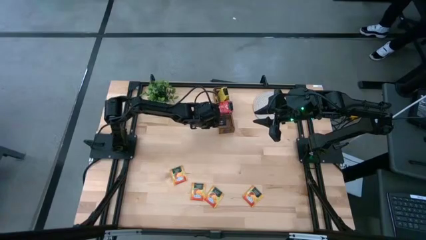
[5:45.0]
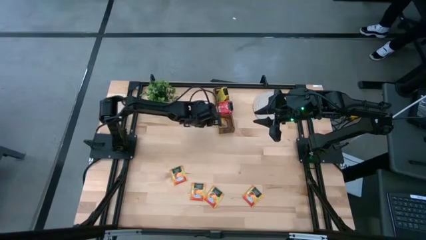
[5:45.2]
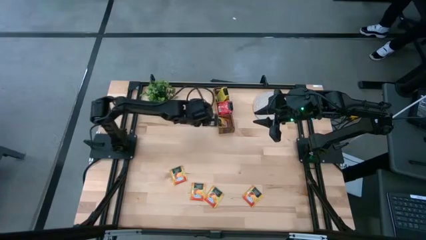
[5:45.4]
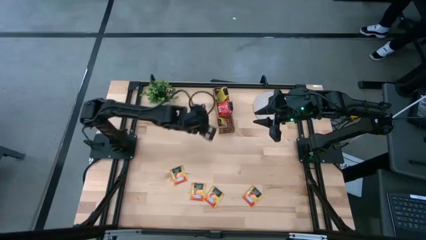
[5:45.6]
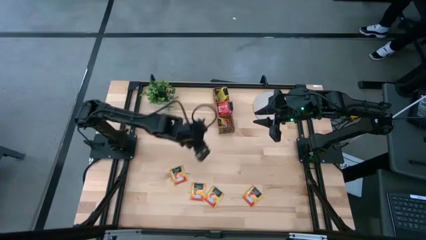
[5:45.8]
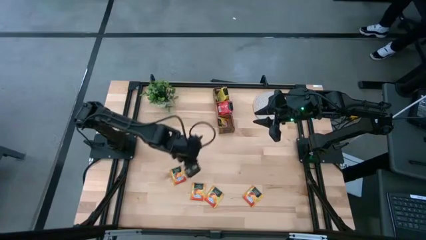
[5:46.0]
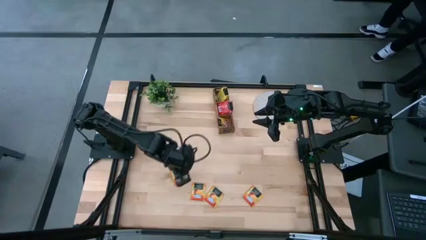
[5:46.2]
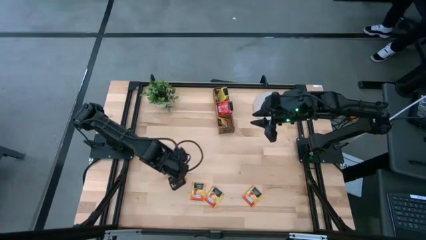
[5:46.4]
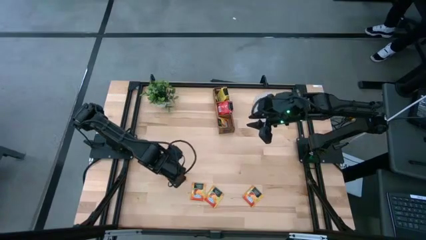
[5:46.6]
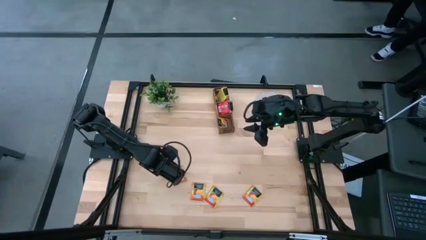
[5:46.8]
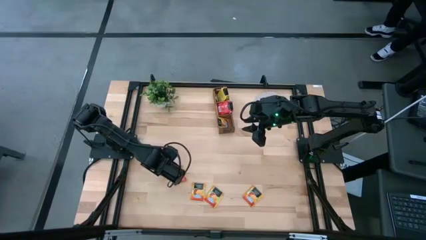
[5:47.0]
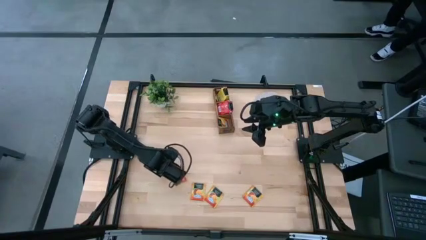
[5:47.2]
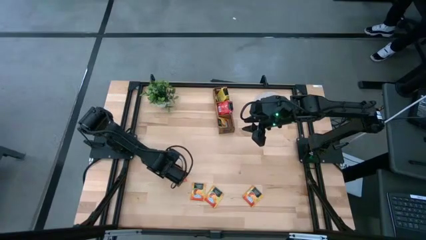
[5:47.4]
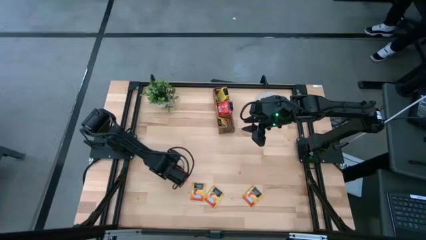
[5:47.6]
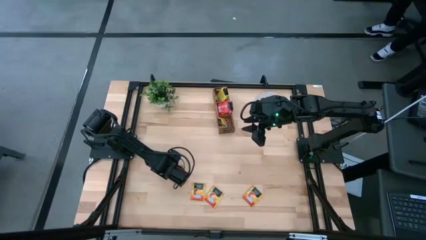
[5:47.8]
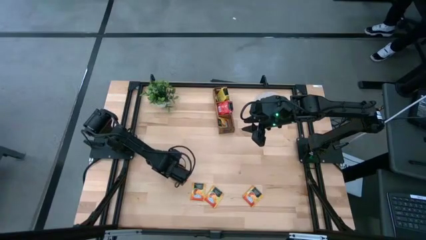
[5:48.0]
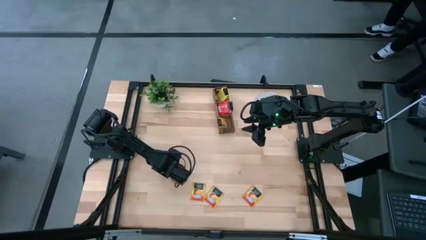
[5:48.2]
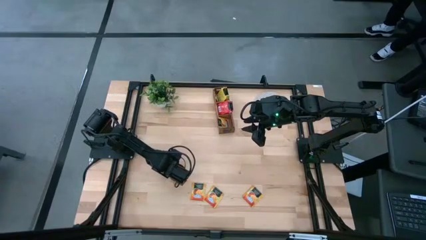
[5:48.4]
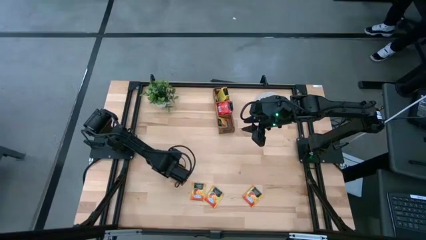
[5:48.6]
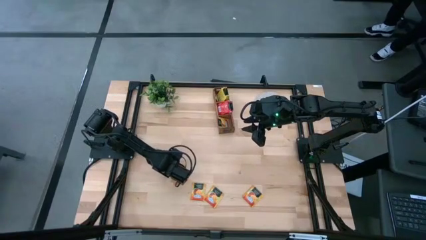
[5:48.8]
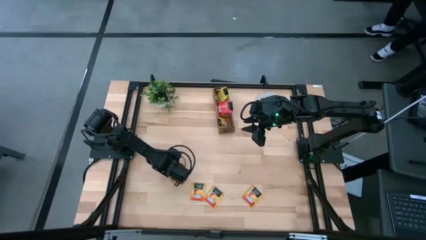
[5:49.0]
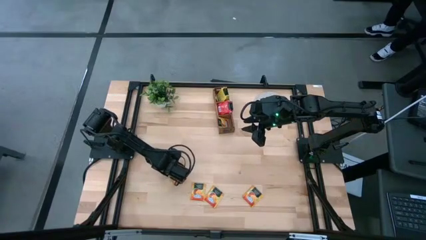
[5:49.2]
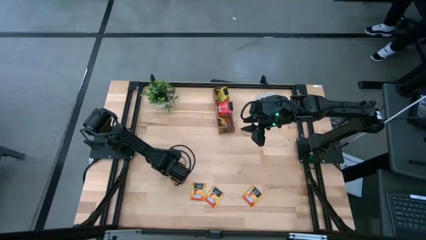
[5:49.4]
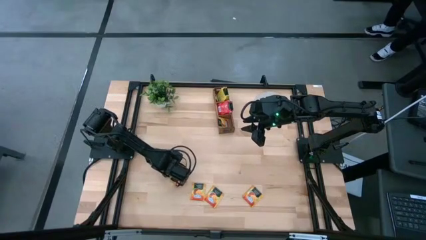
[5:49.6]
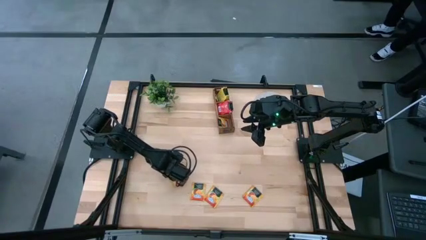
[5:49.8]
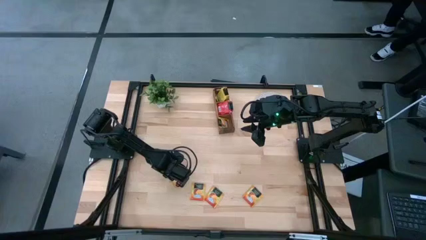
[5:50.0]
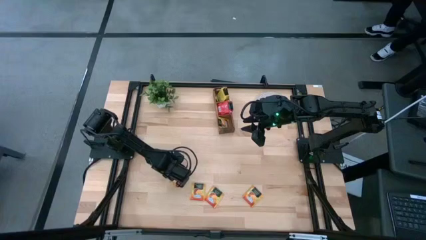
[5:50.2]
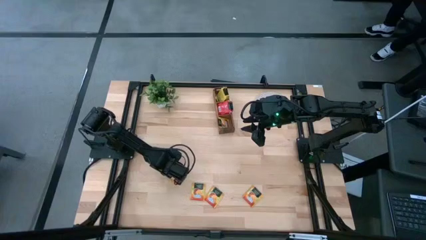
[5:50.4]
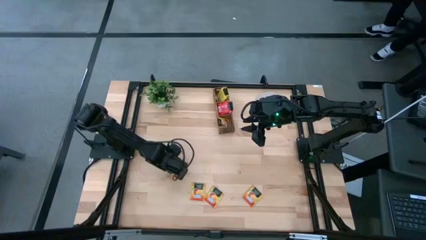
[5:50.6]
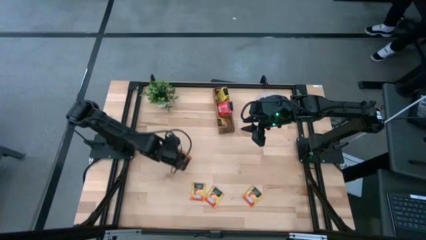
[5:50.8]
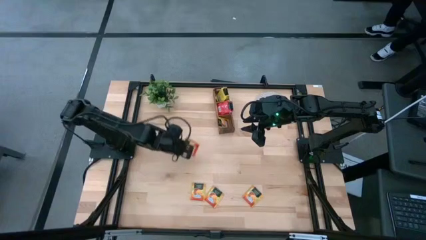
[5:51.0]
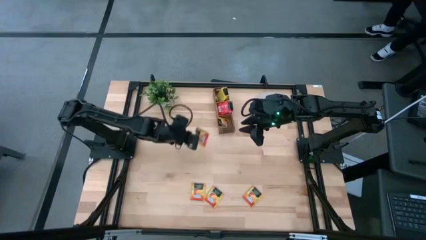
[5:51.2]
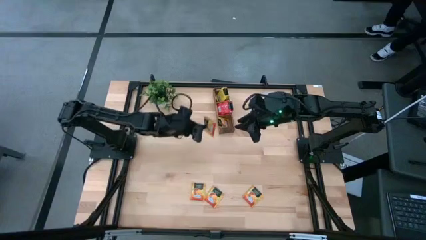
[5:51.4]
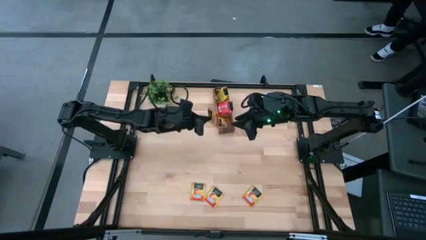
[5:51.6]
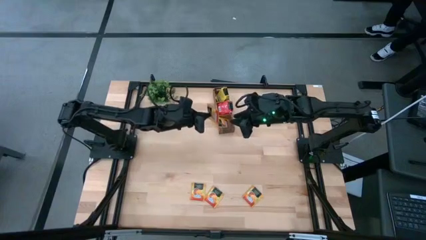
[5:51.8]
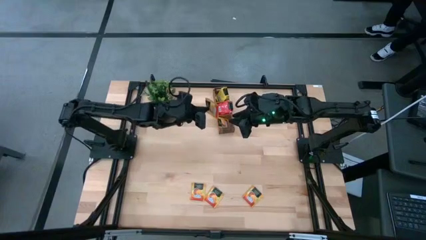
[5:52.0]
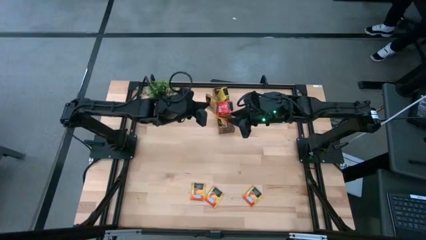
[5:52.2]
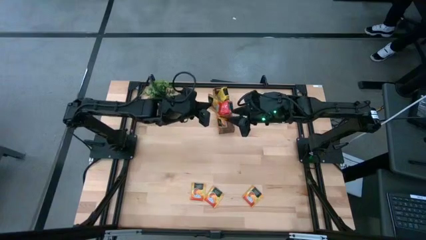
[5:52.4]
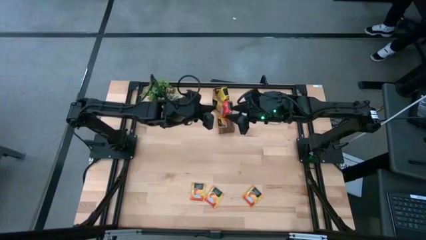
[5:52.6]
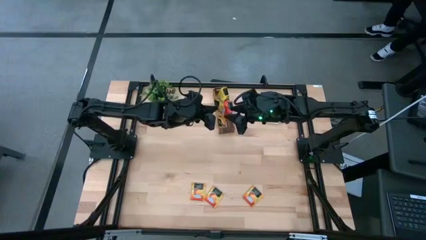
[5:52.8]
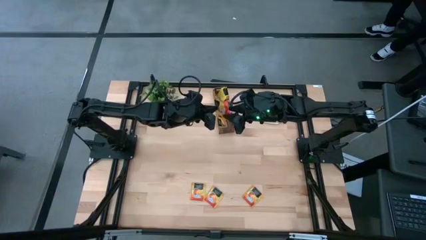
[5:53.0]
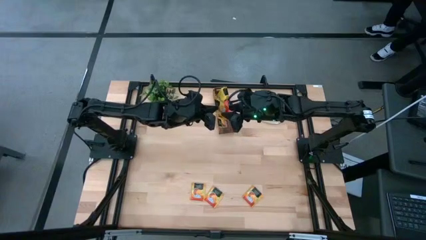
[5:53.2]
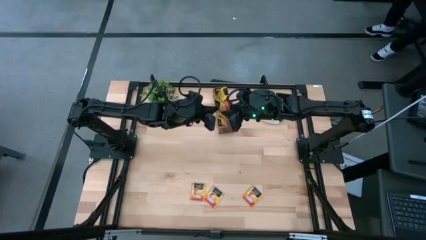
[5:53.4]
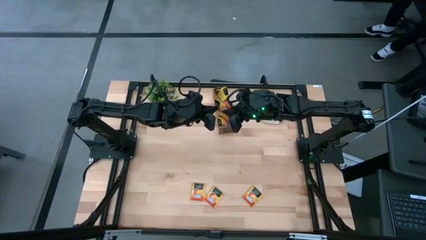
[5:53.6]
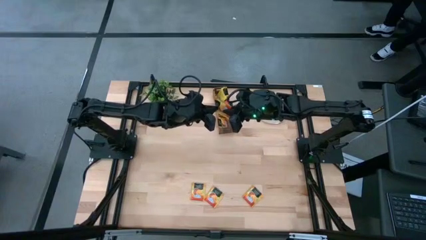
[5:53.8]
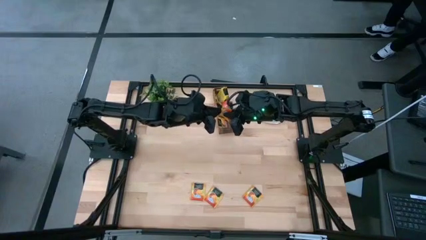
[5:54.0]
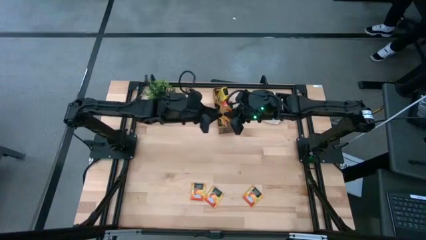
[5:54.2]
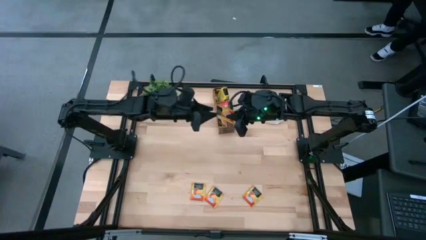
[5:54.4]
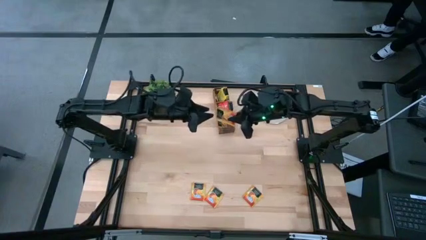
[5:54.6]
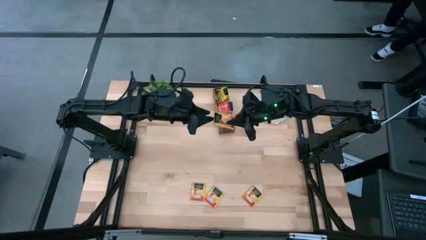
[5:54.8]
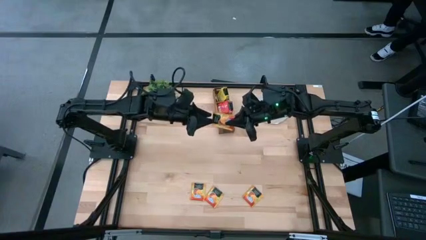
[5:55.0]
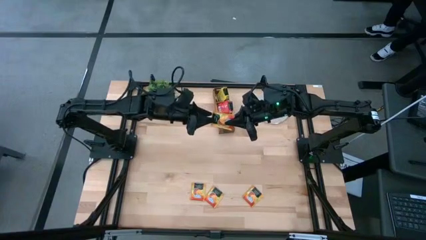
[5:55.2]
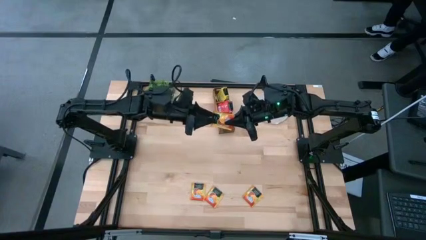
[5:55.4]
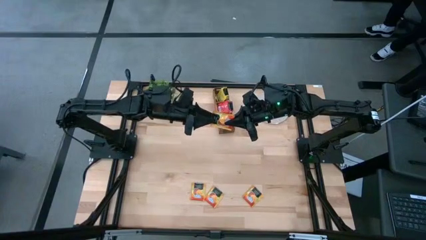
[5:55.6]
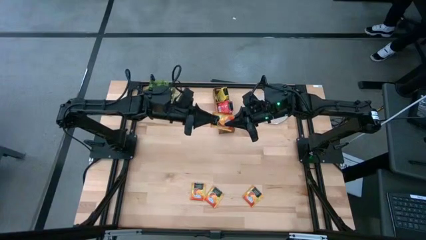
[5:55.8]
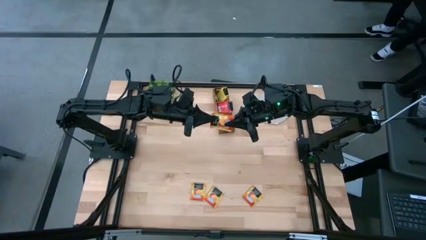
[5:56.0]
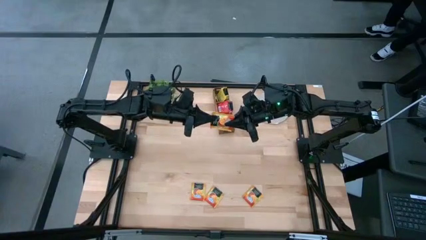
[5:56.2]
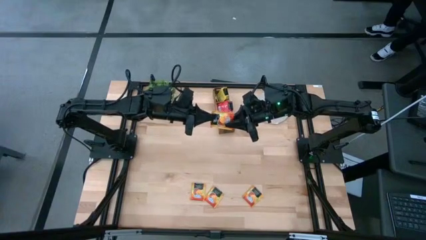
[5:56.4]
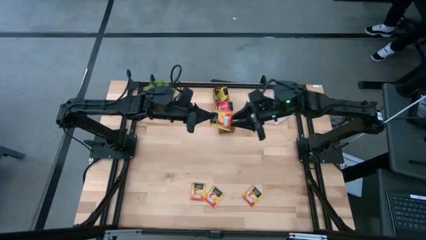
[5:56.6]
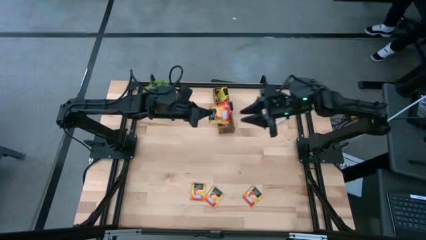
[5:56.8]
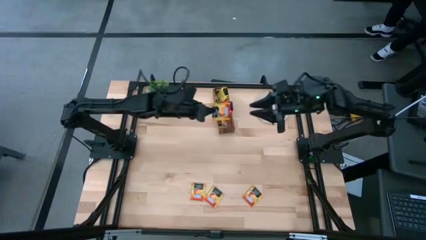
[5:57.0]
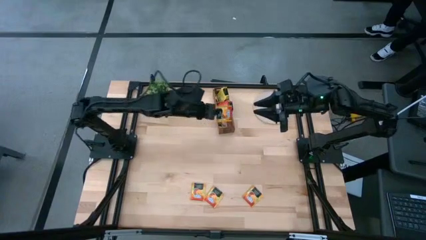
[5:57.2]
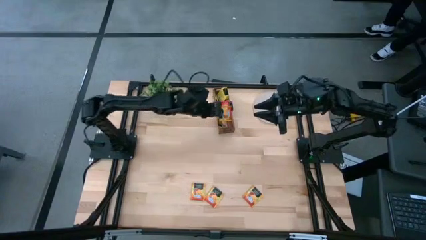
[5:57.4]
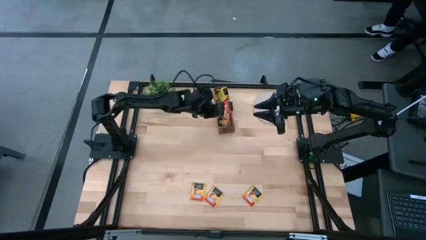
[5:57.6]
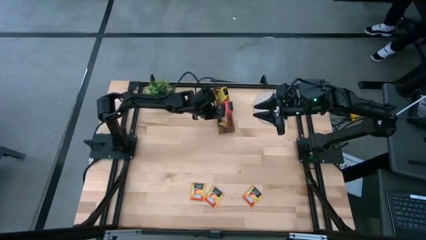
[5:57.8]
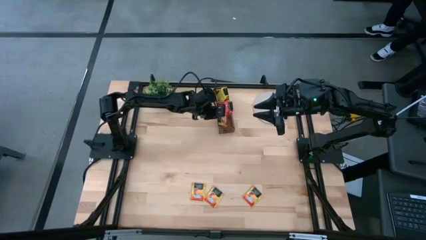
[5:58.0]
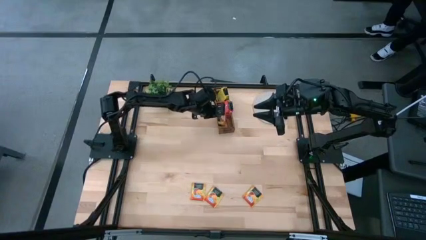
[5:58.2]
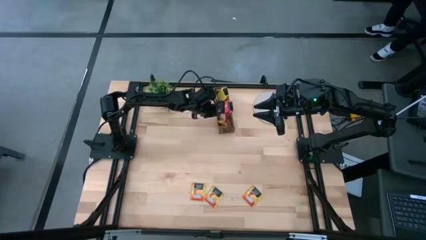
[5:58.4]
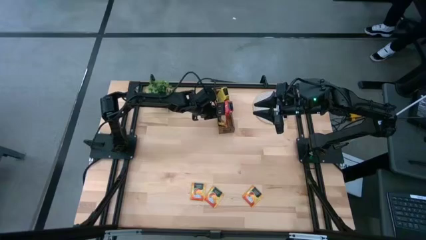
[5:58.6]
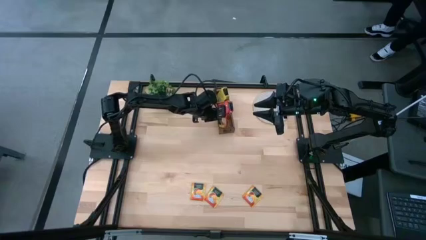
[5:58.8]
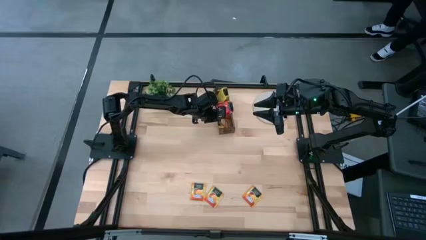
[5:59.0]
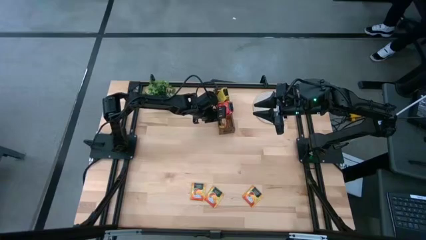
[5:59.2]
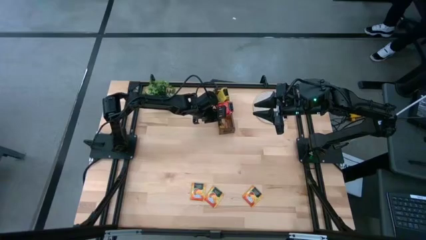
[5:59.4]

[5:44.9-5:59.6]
Task: Pick & Place Tea
Put the orange tea bag into the left section of the wooden organizer

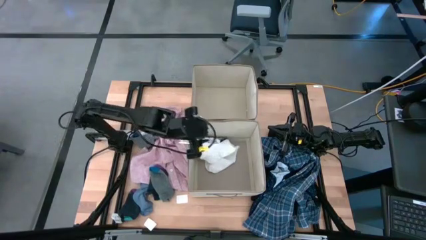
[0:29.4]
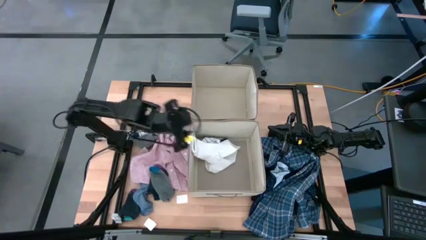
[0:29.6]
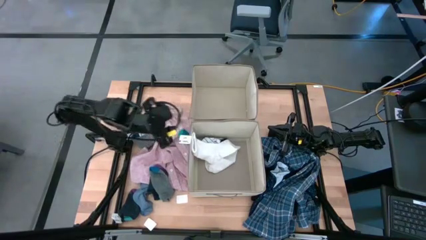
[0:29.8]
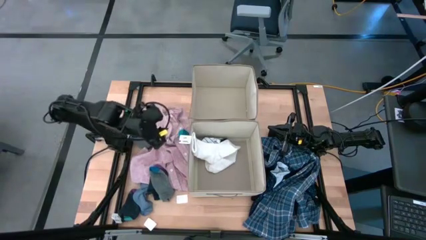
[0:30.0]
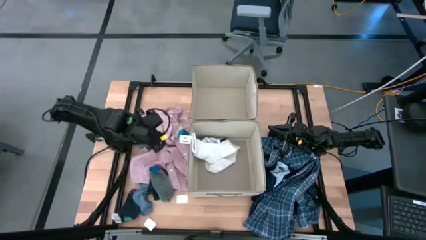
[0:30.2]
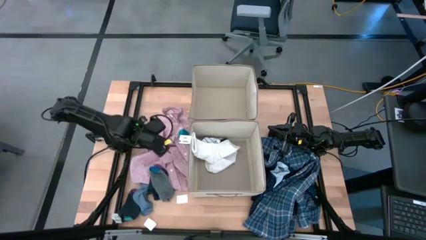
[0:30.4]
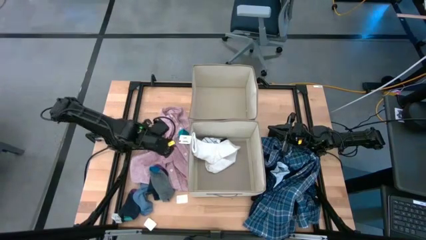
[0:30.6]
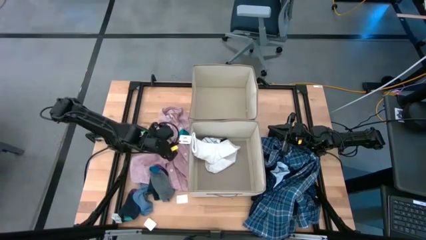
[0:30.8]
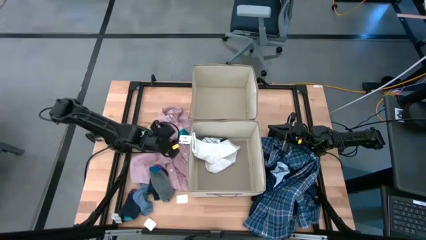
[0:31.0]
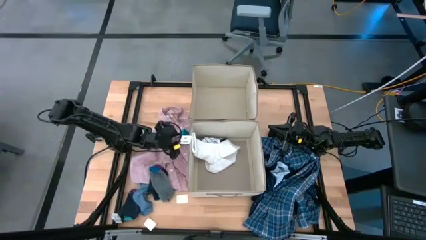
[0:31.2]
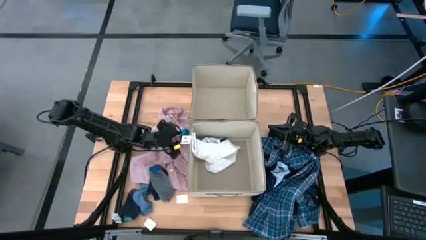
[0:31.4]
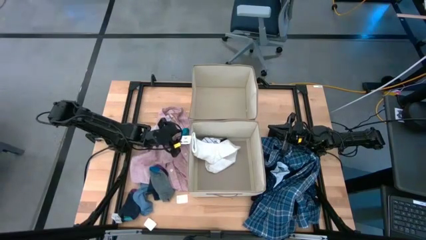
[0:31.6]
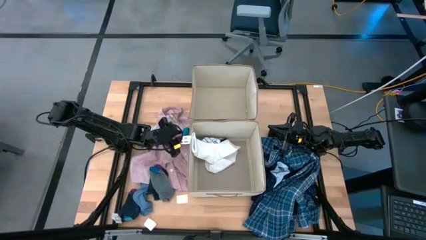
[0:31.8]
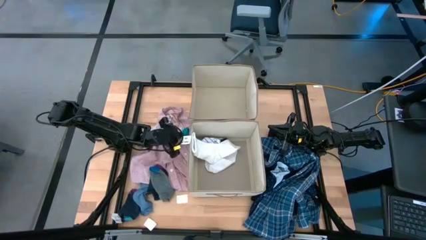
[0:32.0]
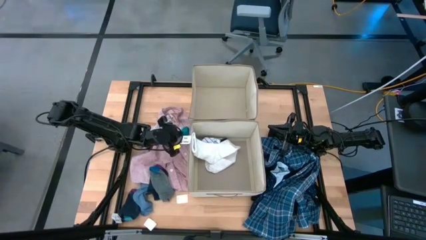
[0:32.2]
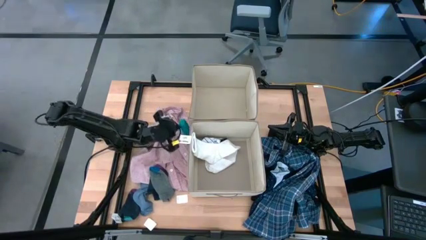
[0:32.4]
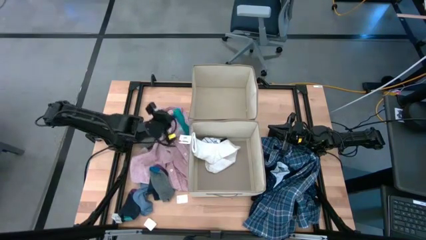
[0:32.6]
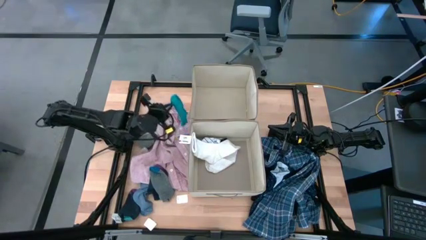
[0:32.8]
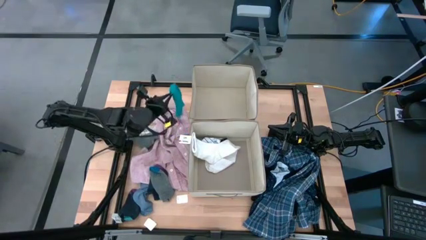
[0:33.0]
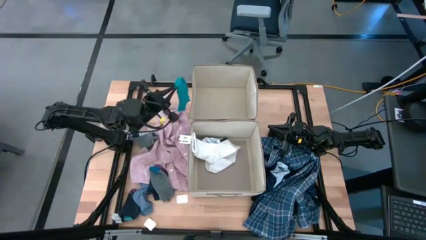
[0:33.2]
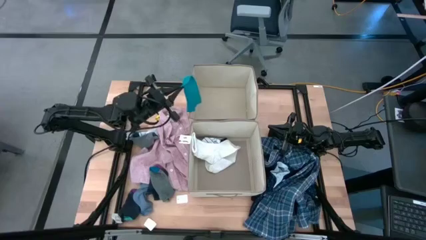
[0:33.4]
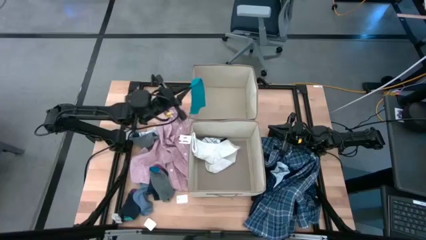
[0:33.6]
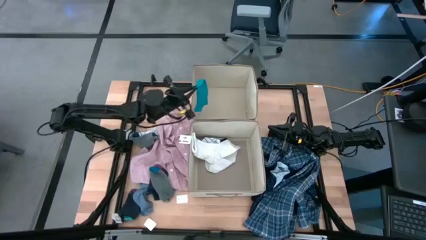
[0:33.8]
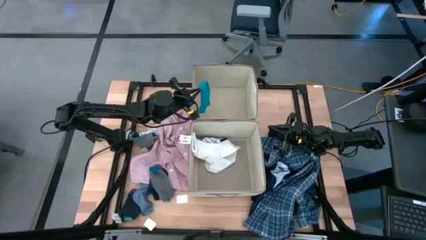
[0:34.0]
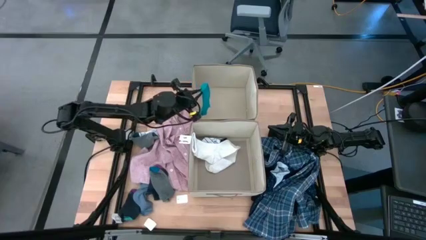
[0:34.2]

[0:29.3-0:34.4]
Task: Sort clothes
Put the blue sock into the top laundry organizer
